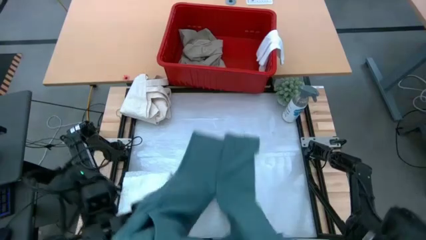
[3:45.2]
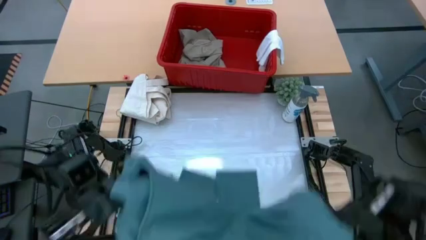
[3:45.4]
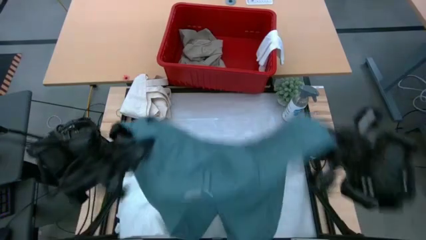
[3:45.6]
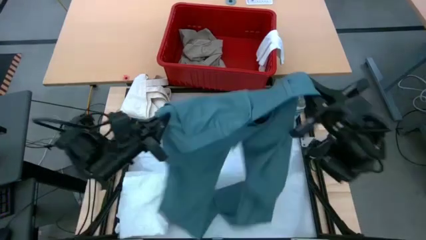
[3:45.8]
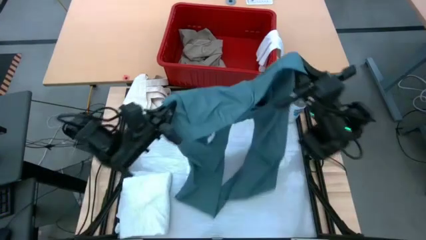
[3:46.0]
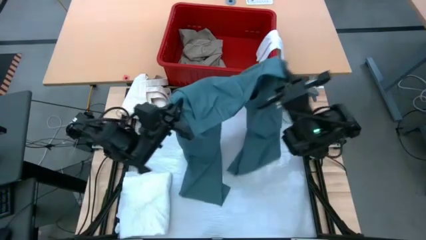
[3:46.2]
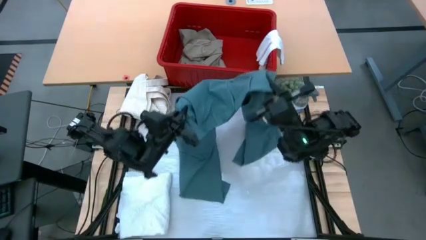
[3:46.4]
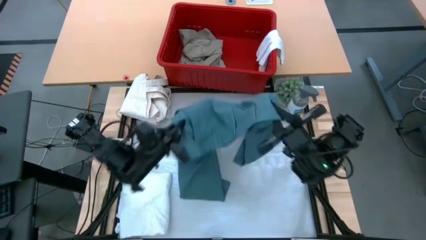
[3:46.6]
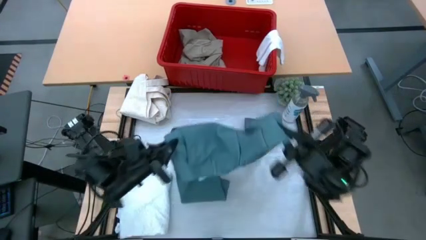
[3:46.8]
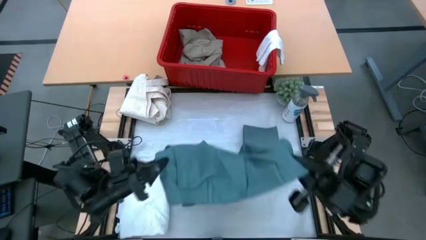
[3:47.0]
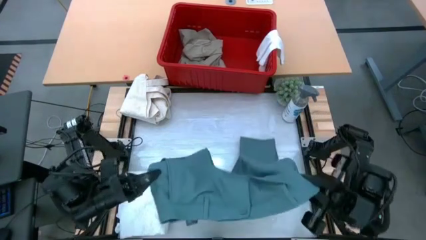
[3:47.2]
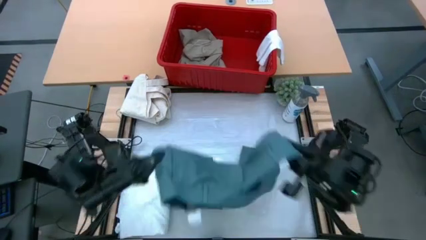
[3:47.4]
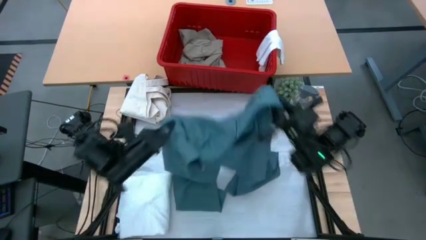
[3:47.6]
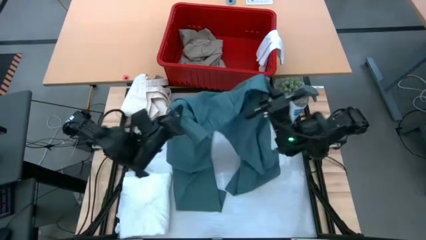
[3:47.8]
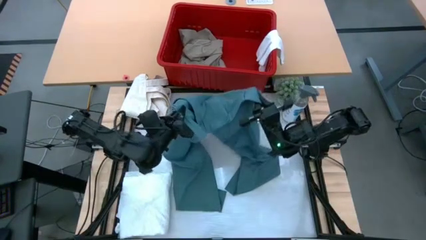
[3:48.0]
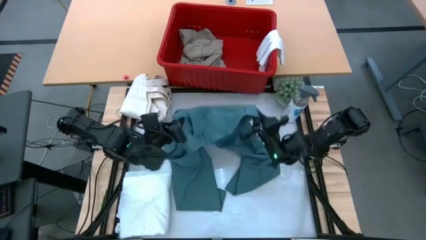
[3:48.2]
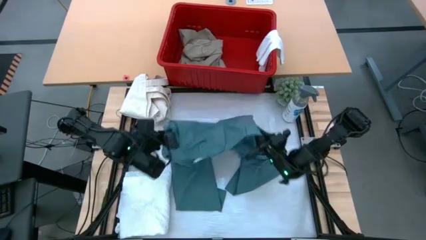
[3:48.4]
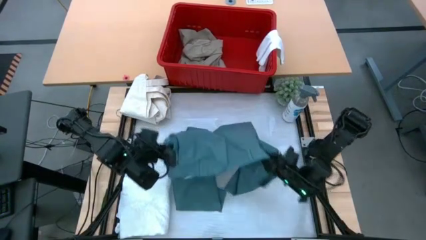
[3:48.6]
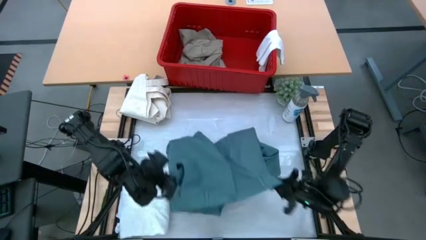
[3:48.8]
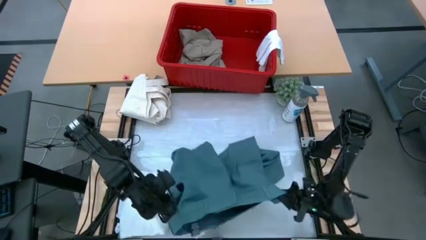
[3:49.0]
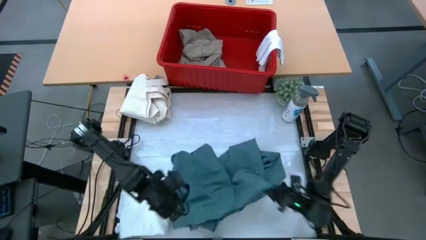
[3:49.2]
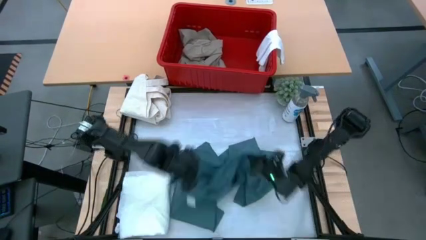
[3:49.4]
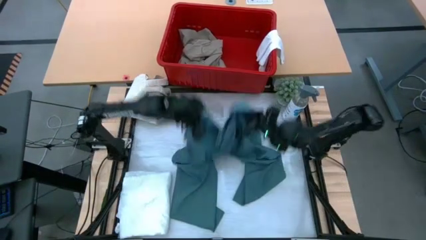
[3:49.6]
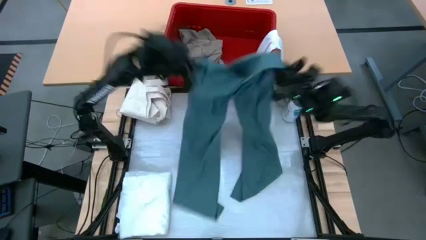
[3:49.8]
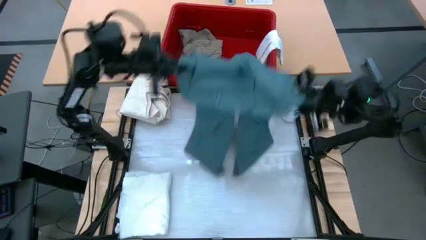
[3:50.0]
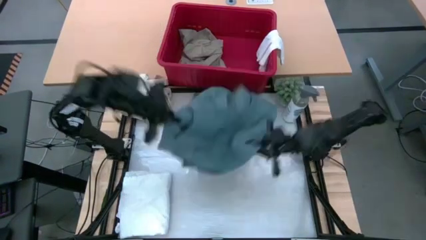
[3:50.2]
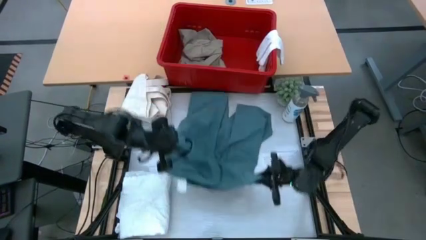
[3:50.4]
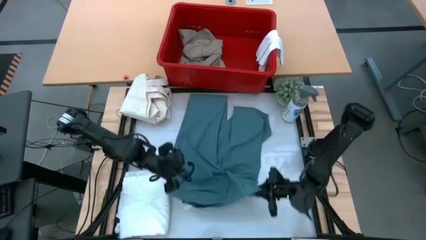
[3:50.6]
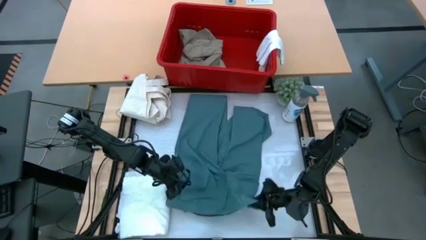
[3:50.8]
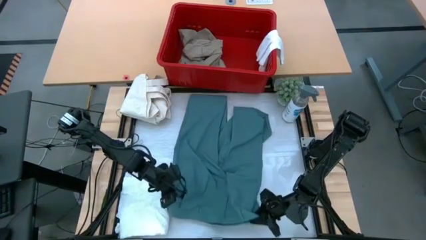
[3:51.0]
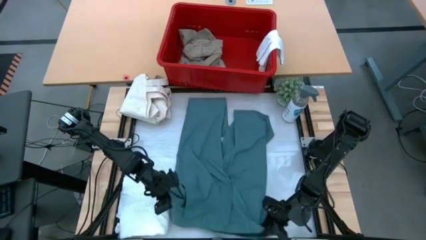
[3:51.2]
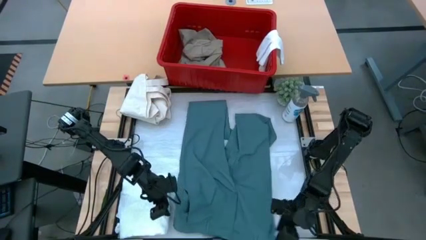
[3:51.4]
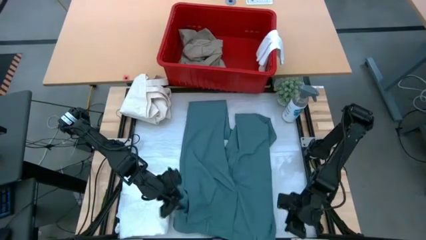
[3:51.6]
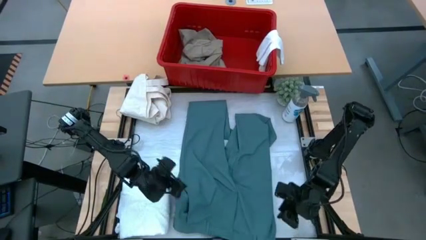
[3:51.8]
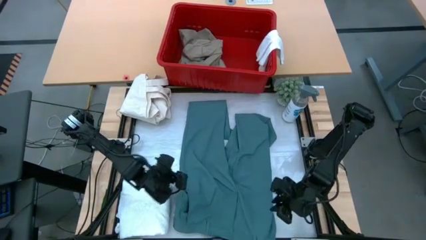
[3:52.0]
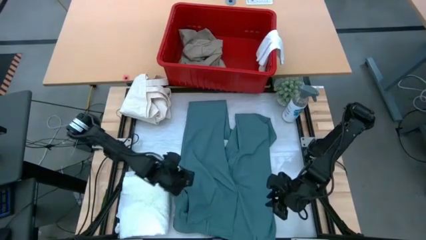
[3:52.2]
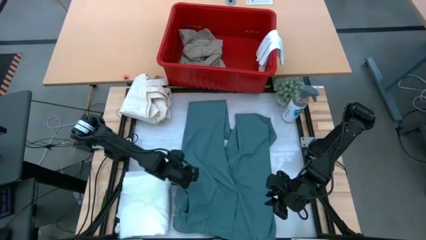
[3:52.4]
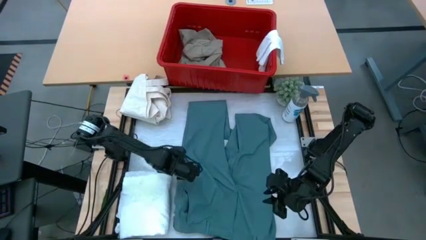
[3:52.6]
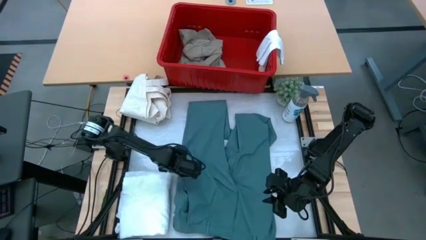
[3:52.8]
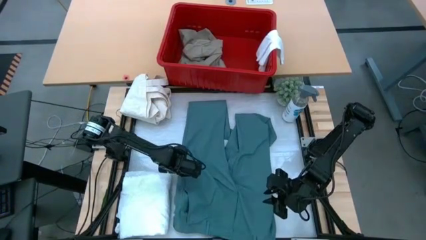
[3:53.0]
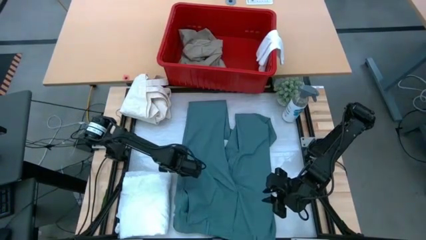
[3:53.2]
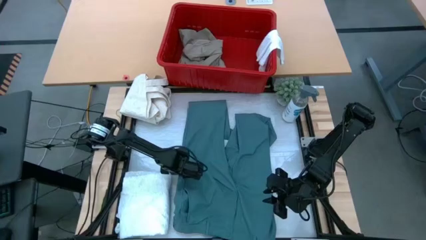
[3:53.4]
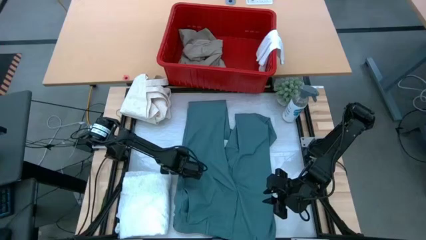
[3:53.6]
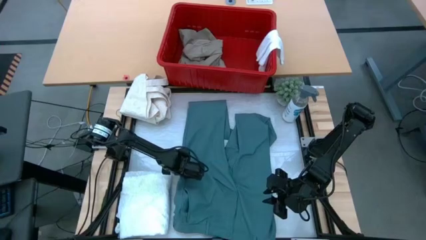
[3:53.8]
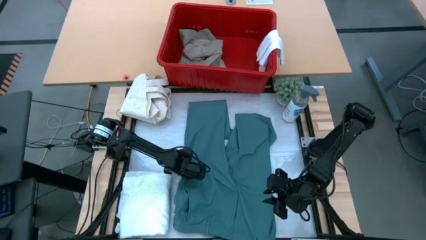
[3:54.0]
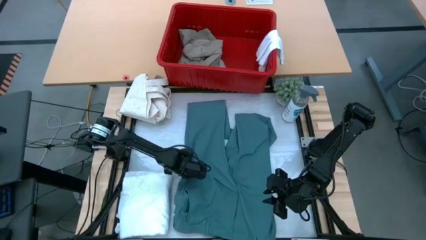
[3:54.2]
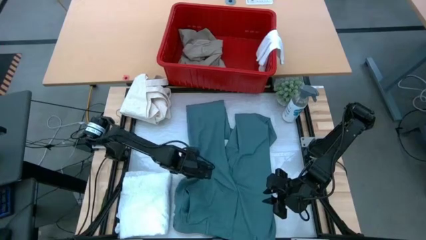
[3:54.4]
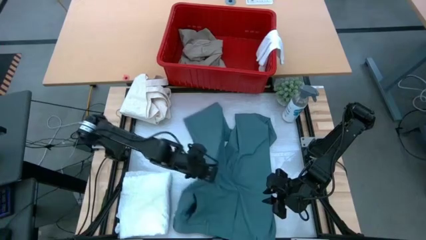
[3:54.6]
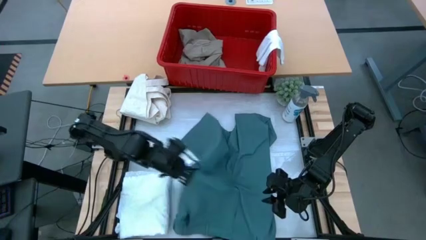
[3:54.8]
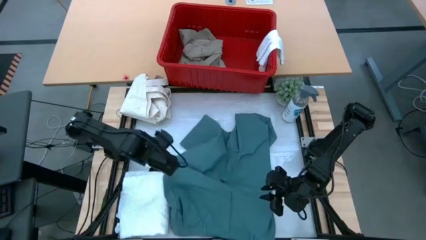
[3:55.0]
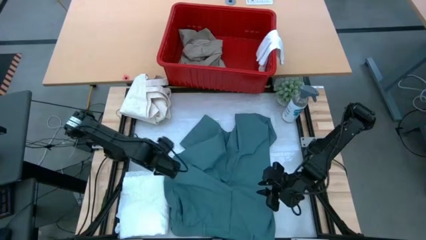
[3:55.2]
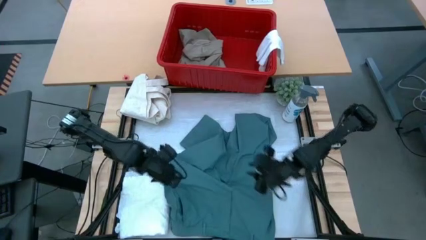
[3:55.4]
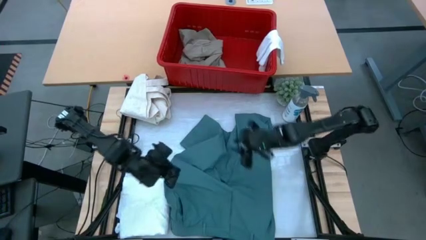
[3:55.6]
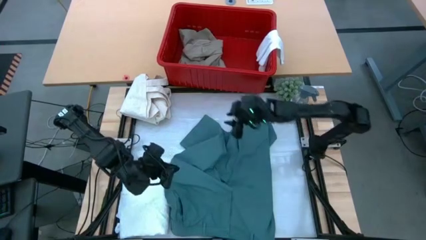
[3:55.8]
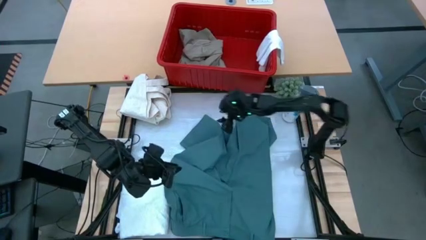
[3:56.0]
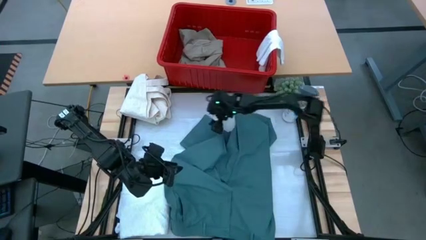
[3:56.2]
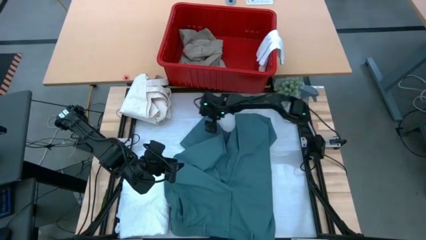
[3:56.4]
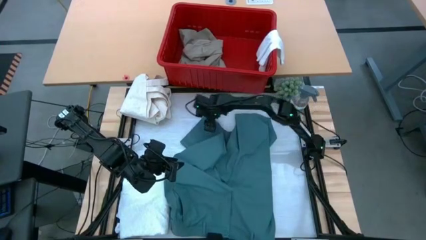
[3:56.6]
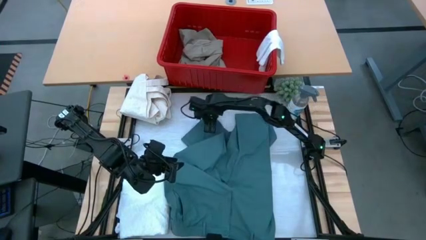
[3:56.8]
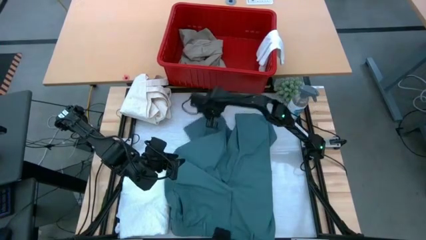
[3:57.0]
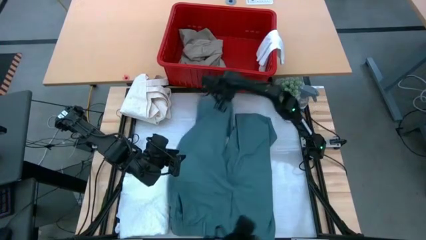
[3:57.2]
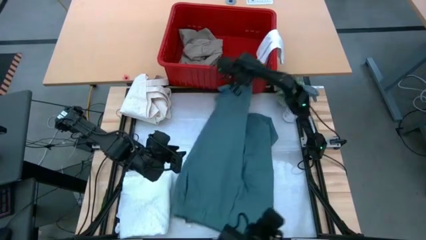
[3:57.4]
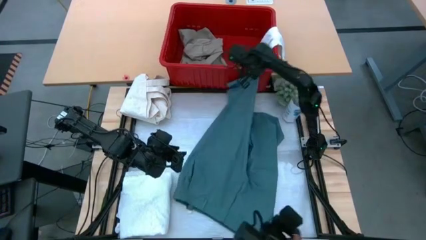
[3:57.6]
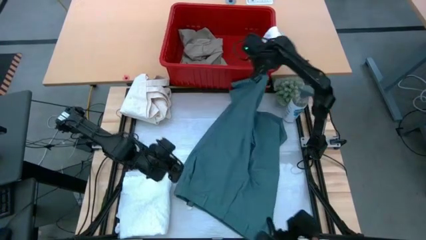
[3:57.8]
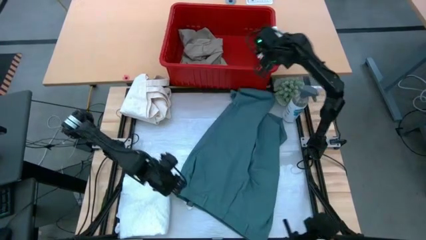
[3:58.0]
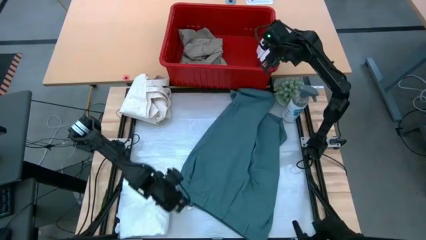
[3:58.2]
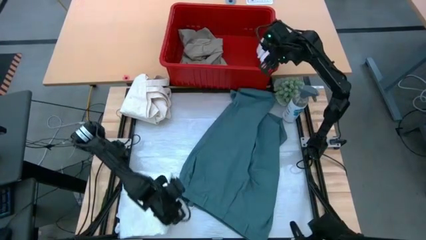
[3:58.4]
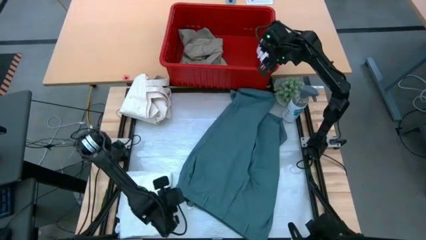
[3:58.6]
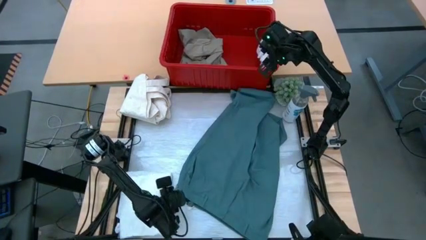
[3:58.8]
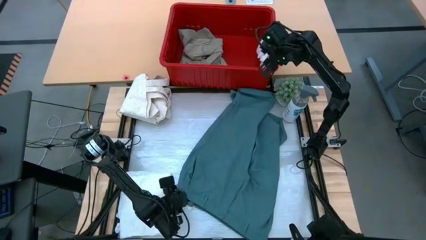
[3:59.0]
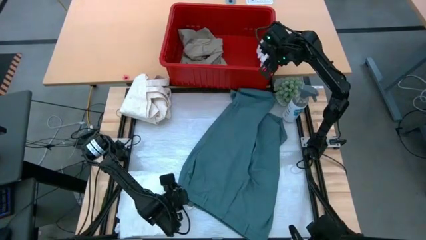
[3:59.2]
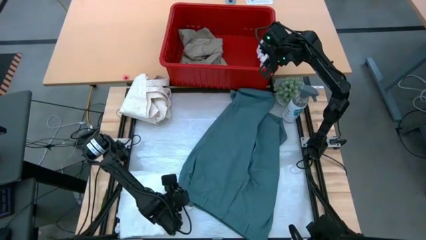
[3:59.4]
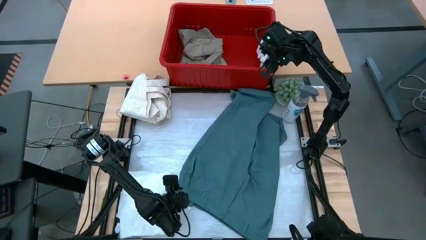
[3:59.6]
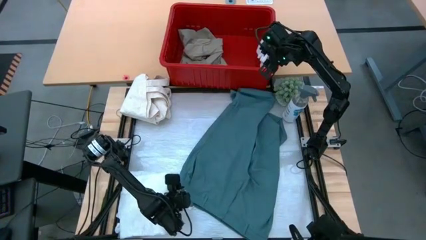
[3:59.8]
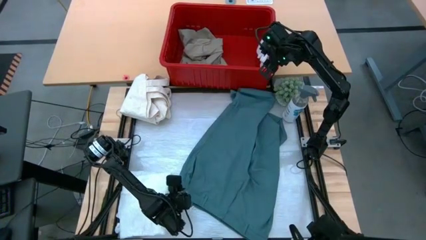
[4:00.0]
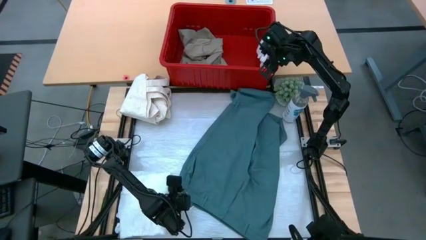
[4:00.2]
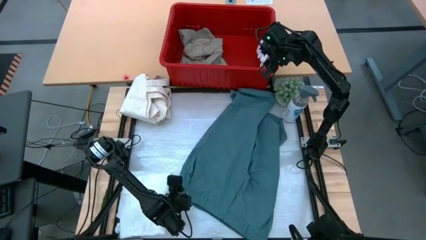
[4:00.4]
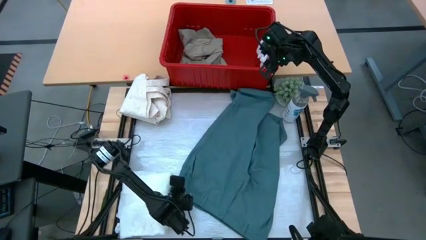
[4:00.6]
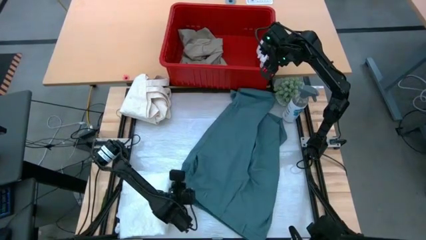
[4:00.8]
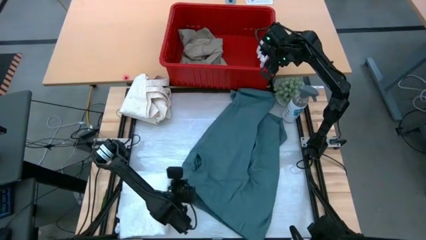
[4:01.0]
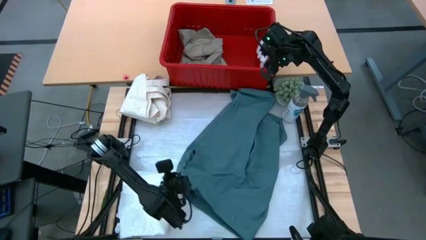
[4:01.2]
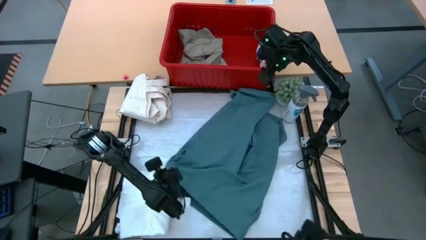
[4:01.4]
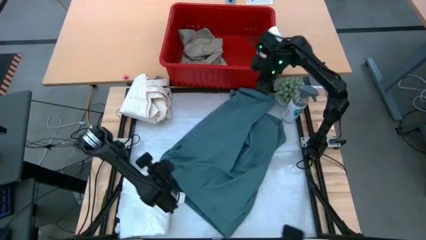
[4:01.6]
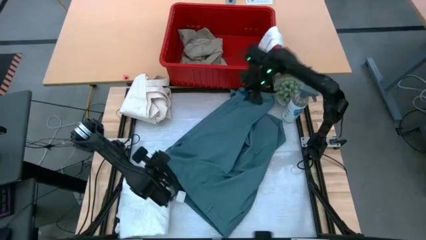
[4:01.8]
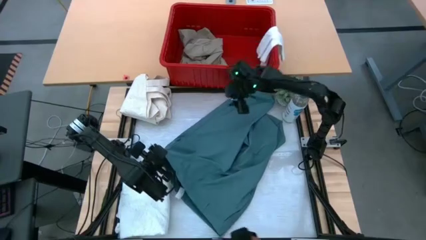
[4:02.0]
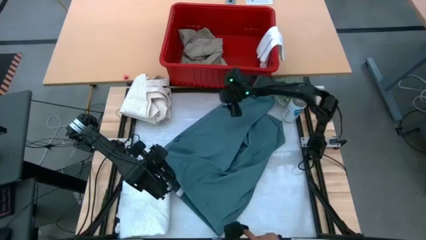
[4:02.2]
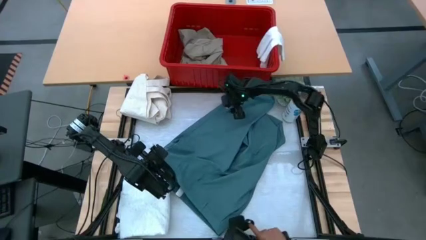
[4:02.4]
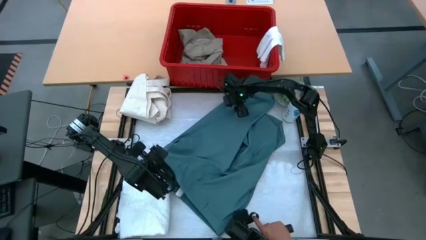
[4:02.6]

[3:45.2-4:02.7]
Task: Fold Laundry from Bin
Fold the blue pants
